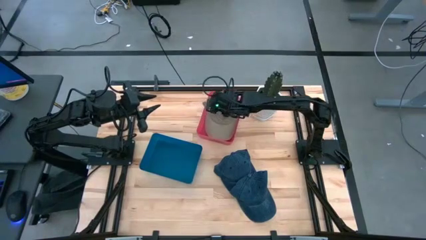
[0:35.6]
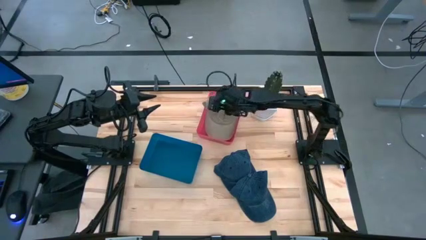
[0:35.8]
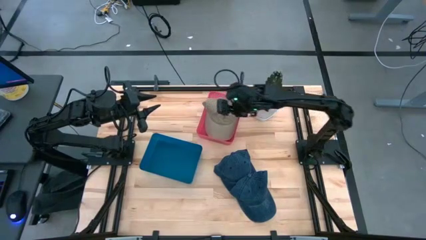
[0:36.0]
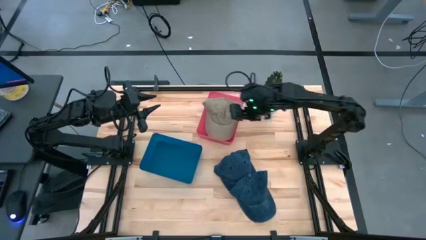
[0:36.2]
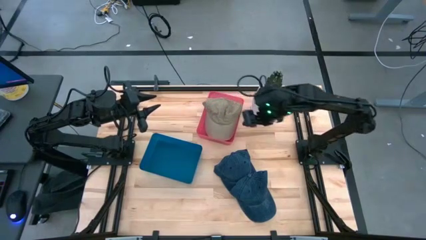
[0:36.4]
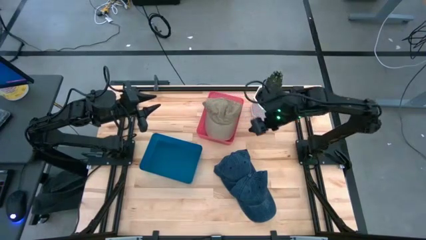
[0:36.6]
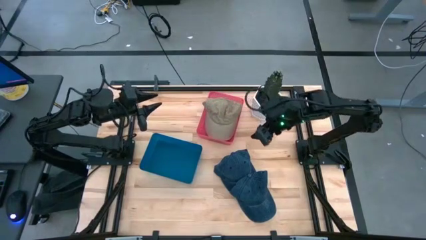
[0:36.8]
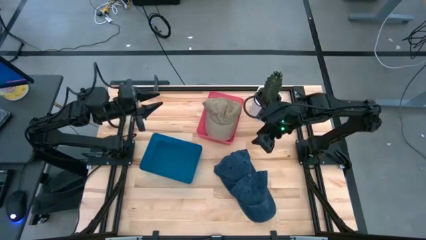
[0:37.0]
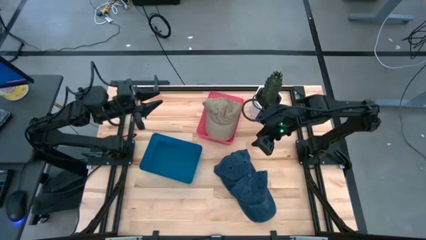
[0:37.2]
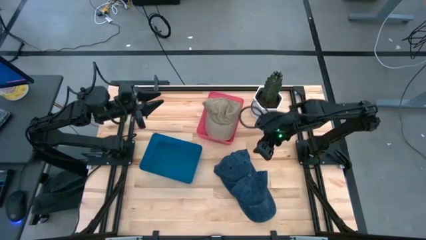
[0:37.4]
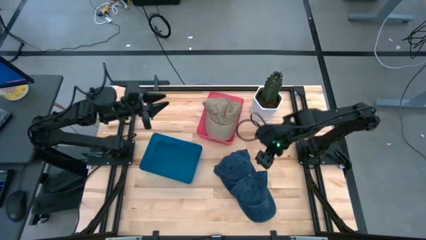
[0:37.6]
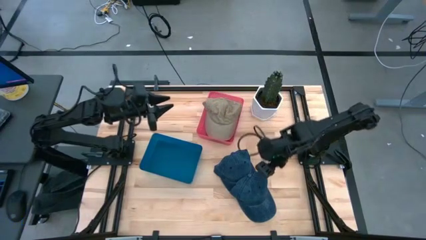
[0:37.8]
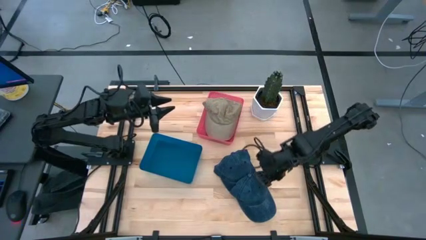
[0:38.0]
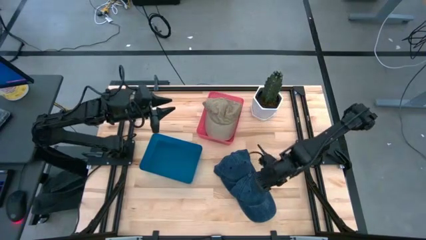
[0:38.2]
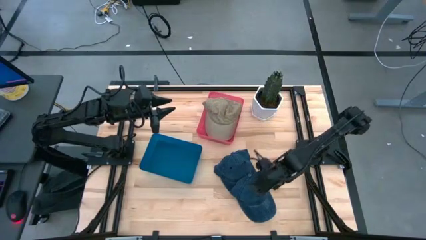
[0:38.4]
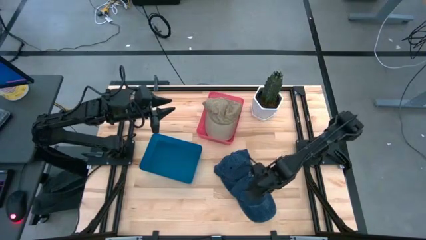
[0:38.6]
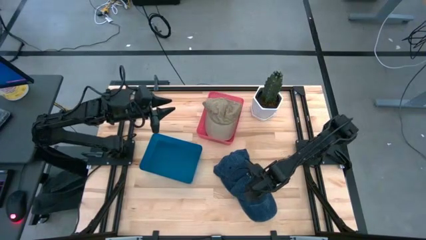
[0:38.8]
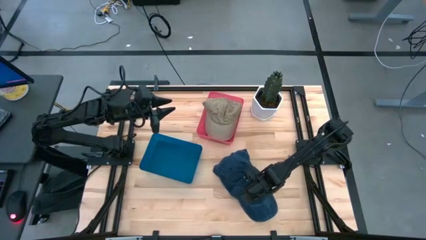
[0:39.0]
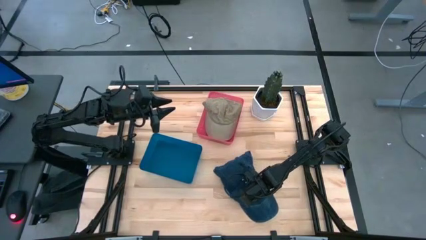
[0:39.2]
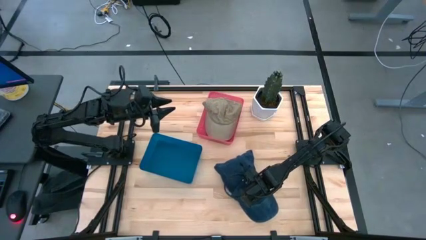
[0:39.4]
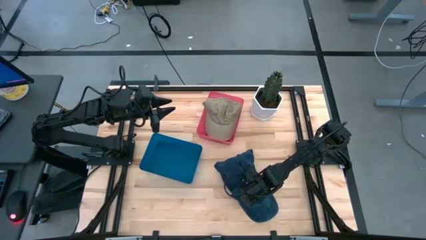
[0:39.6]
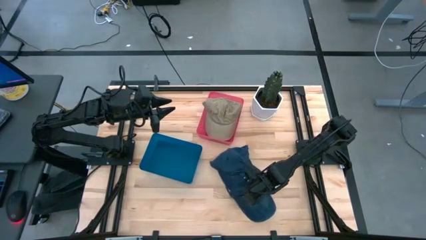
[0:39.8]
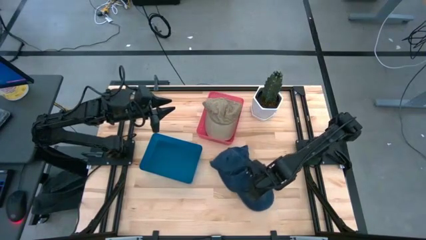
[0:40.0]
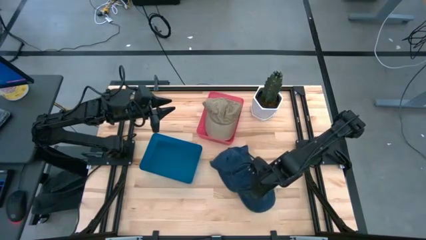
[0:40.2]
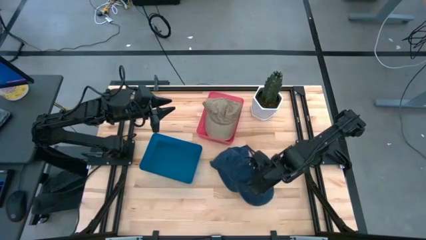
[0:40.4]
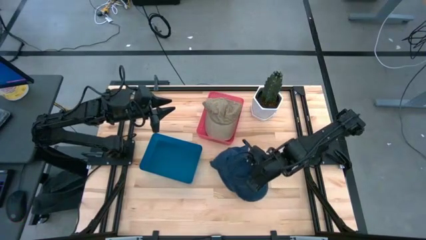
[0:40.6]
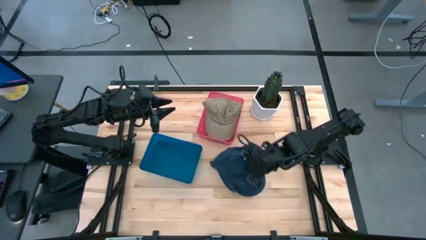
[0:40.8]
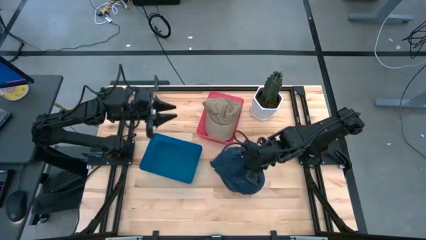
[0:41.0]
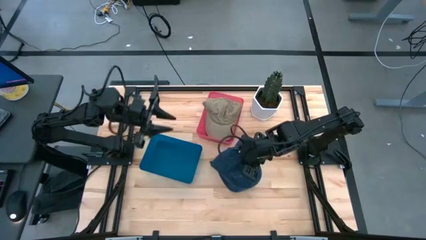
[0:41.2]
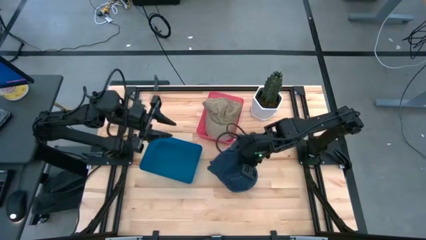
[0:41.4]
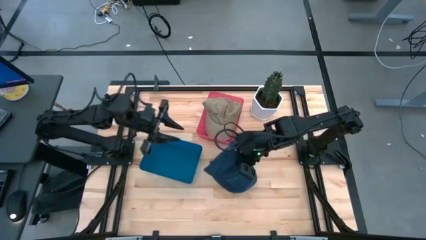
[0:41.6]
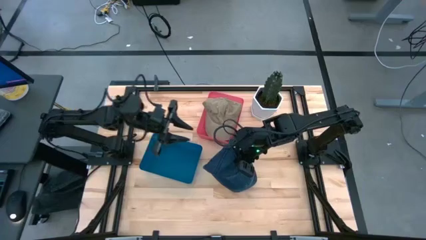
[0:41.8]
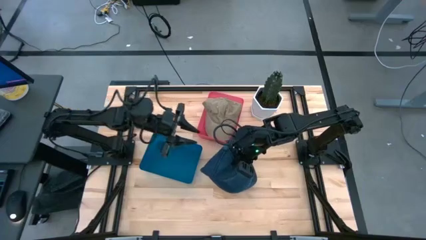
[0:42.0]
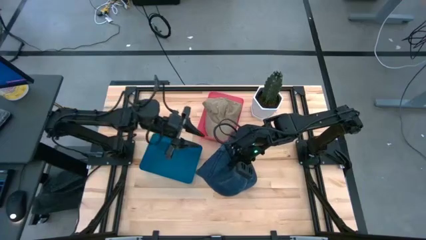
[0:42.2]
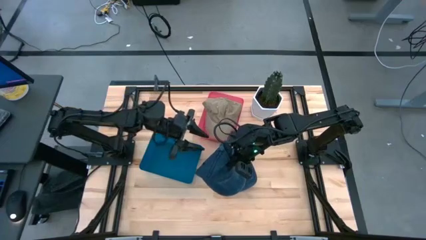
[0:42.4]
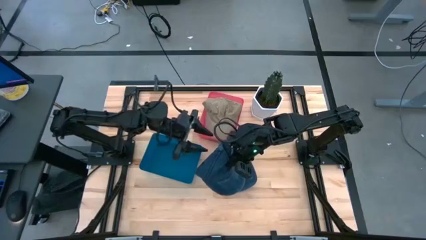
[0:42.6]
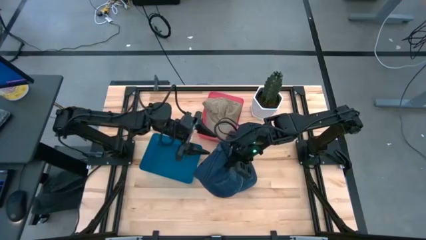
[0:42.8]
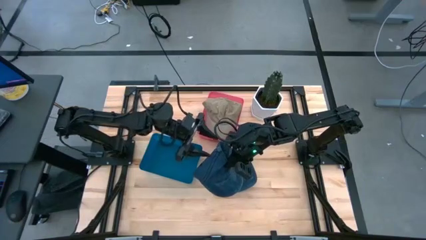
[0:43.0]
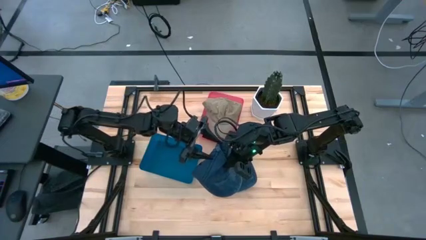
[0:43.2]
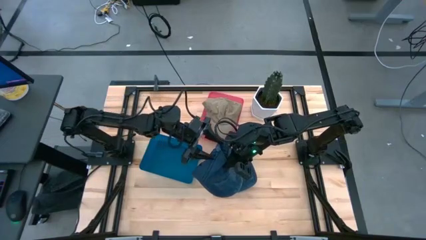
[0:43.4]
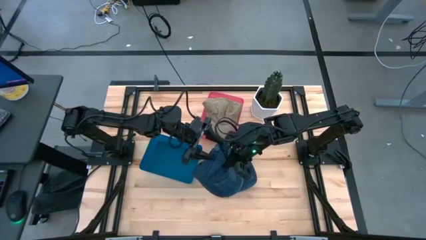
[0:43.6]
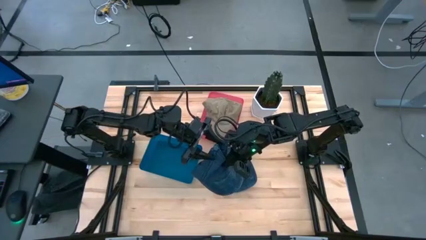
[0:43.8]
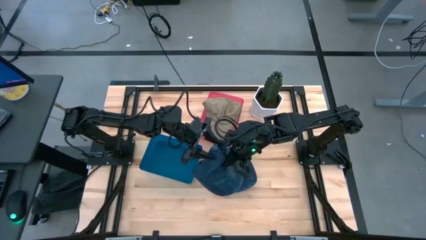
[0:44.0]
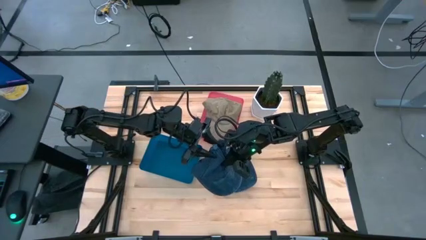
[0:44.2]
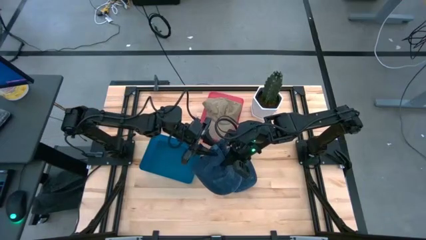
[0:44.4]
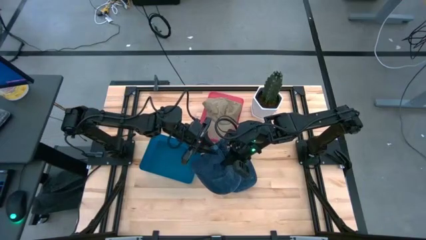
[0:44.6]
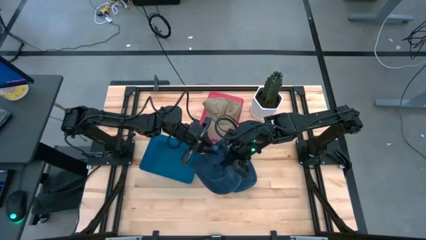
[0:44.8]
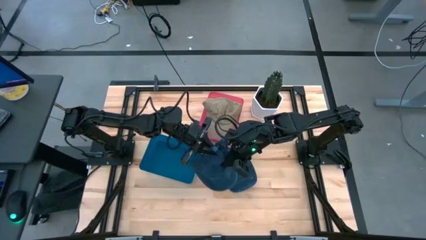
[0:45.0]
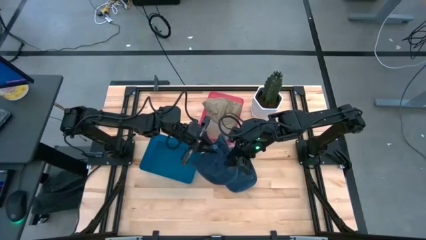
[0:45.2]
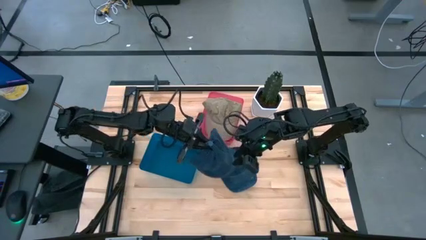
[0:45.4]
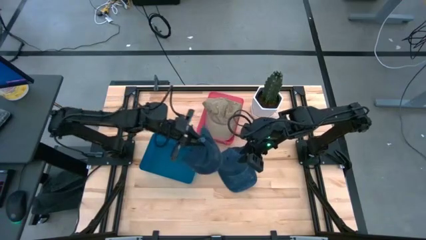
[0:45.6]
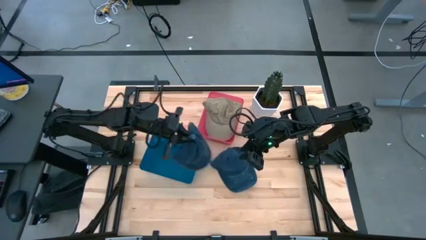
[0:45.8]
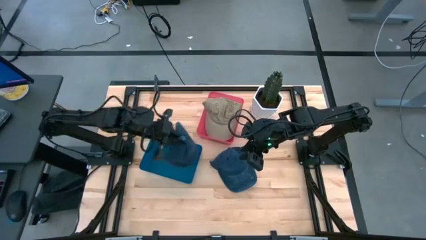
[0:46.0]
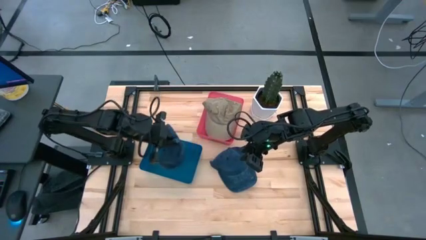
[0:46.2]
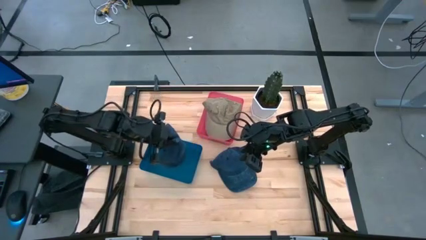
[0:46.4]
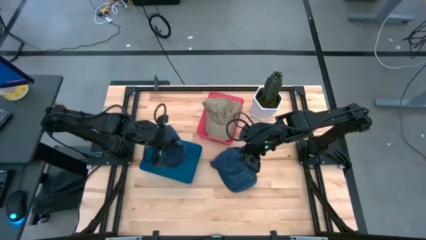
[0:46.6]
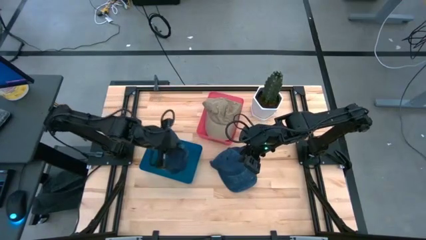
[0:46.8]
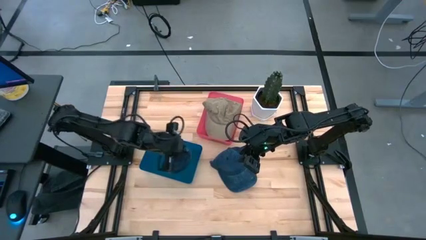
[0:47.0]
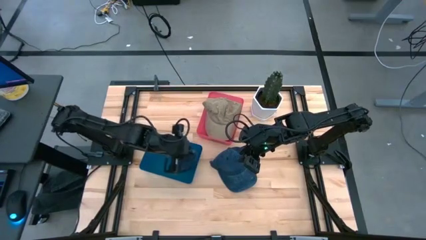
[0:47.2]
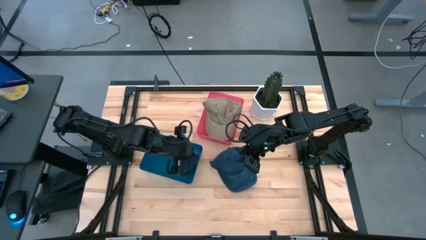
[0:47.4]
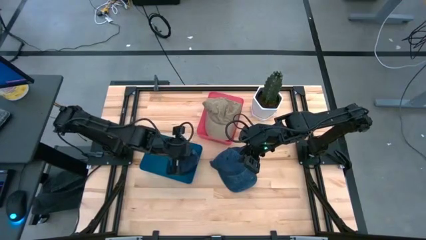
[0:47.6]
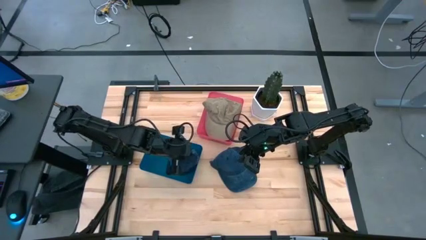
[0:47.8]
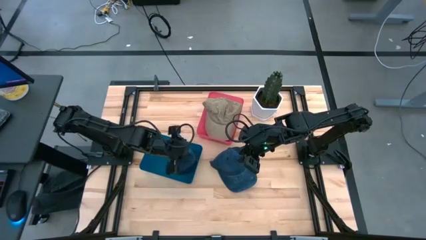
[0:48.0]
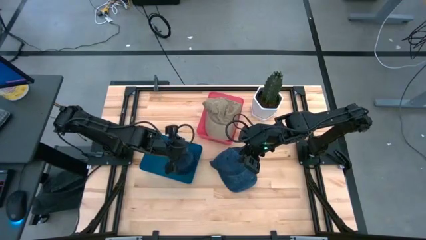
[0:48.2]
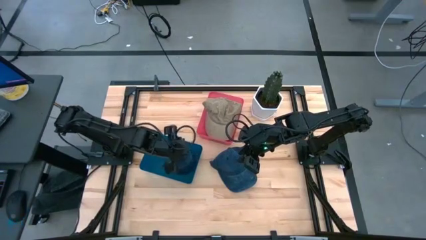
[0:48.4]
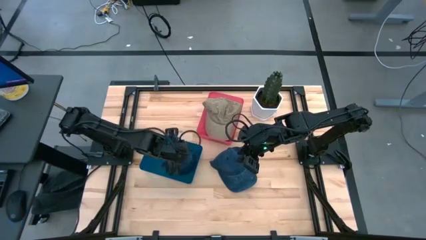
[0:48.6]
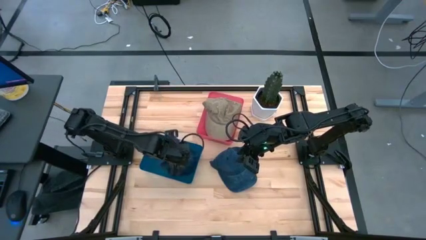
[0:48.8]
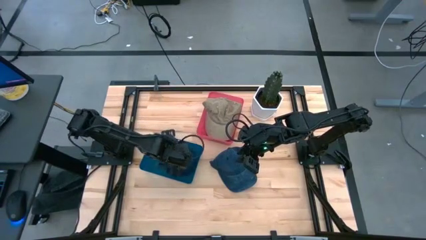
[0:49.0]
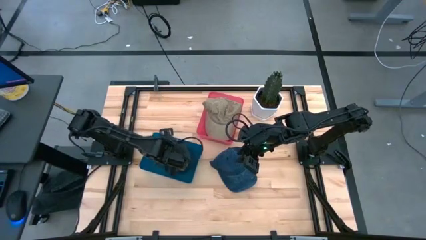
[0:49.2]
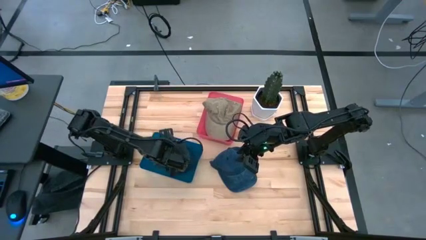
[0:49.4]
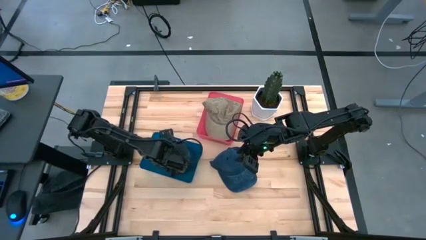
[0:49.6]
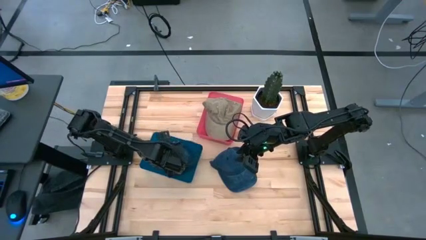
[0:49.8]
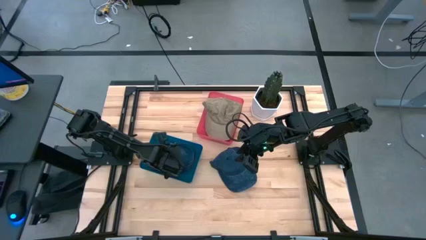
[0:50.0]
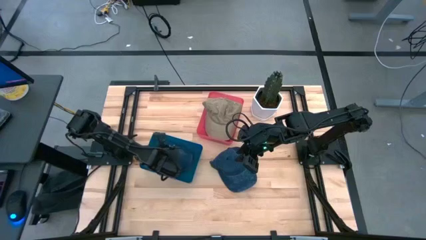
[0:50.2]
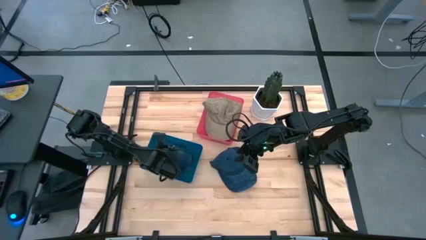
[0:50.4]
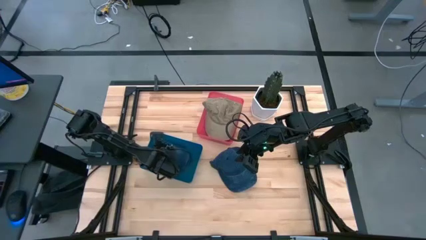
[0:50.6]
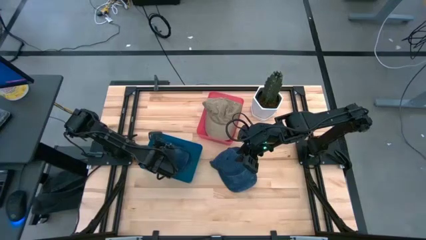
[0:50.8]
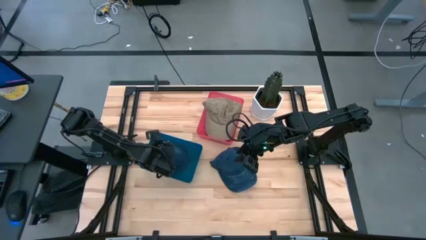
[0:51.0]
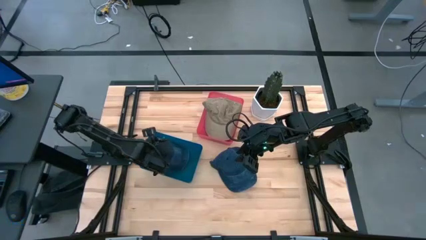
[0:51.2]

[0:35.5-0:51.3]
Task: Pick & Place hat
Put the bottom blue cap into the blue bin
